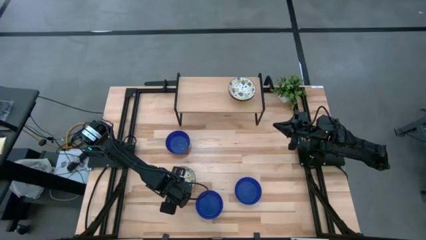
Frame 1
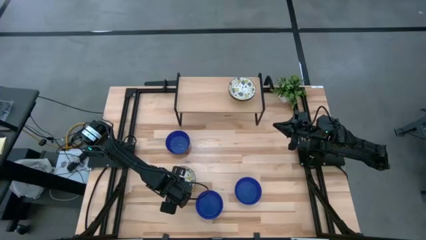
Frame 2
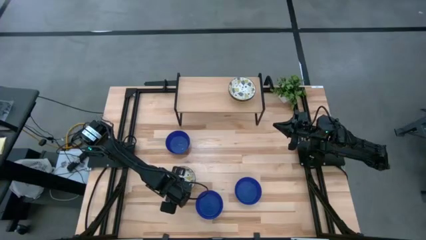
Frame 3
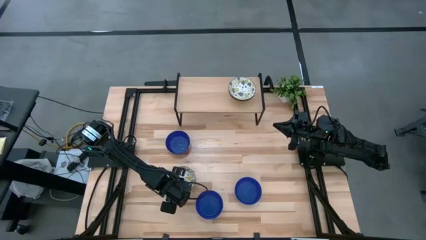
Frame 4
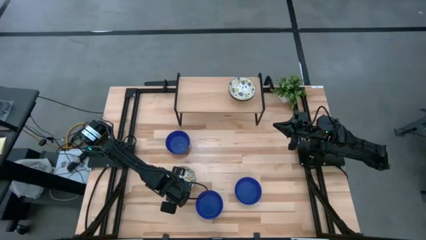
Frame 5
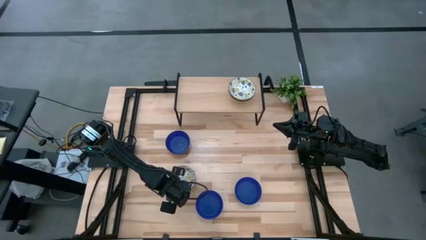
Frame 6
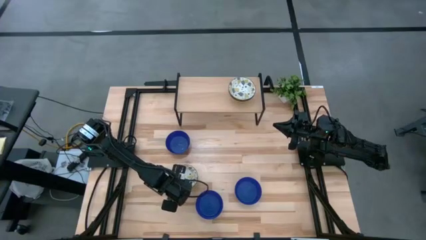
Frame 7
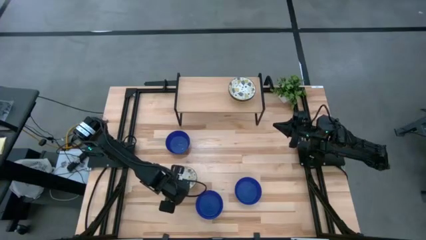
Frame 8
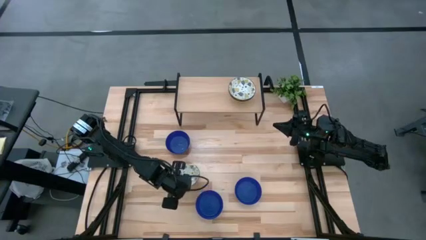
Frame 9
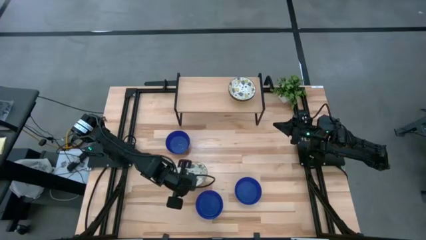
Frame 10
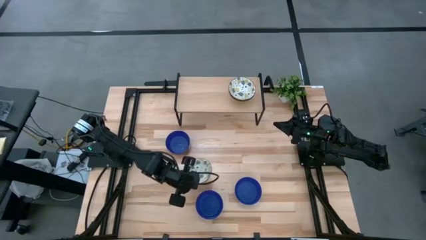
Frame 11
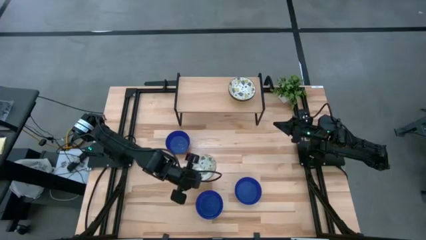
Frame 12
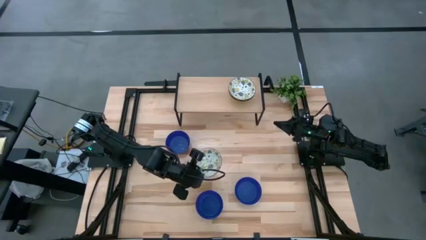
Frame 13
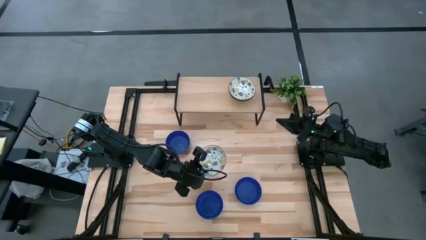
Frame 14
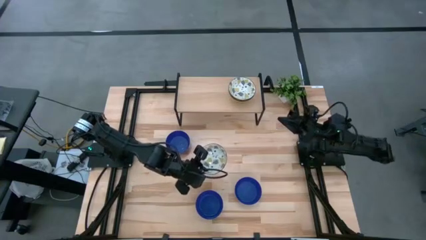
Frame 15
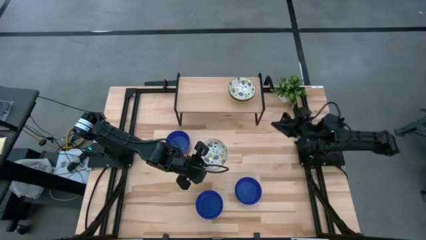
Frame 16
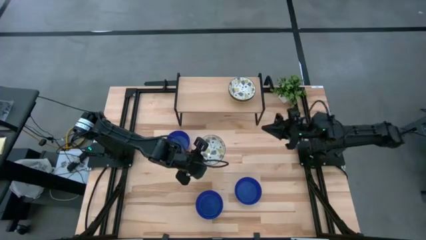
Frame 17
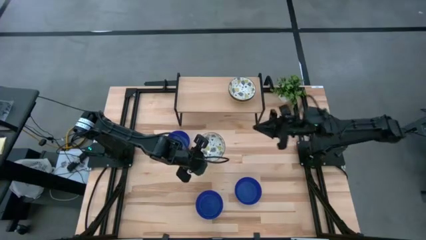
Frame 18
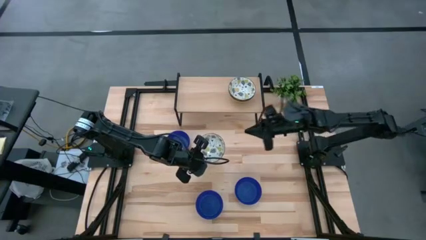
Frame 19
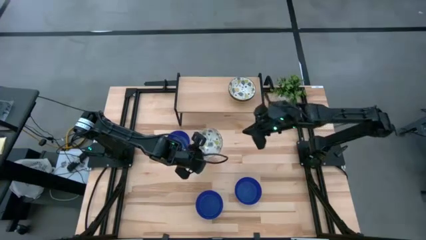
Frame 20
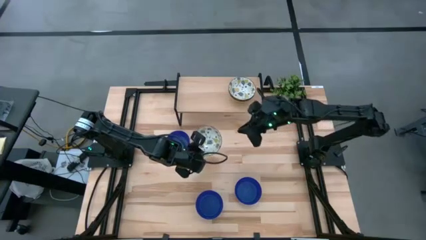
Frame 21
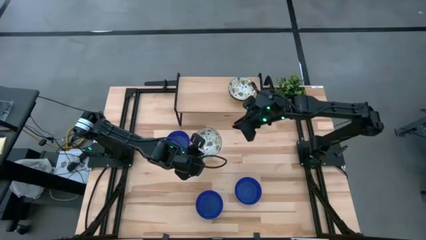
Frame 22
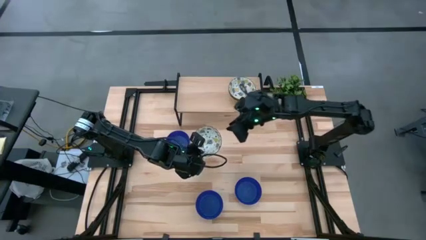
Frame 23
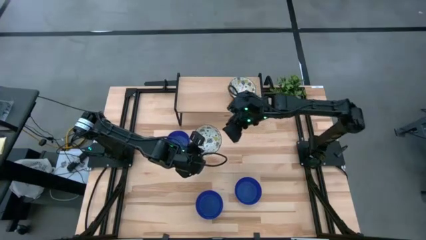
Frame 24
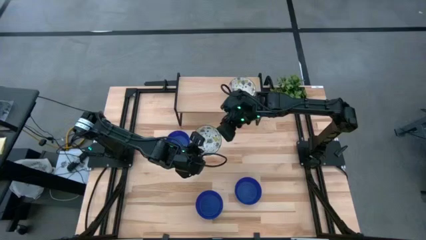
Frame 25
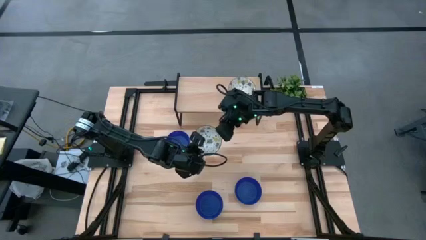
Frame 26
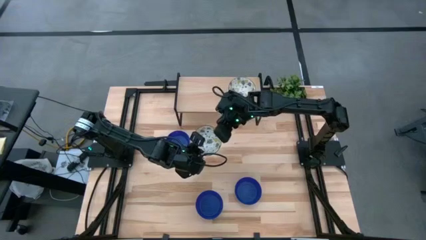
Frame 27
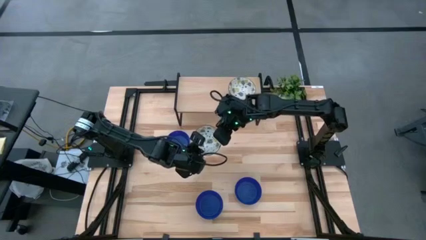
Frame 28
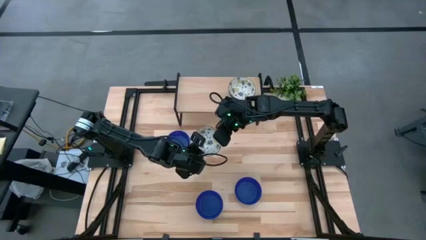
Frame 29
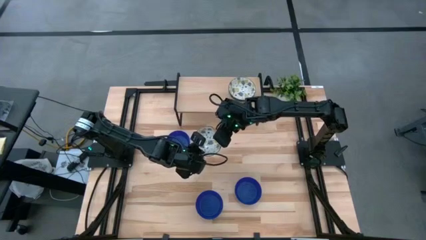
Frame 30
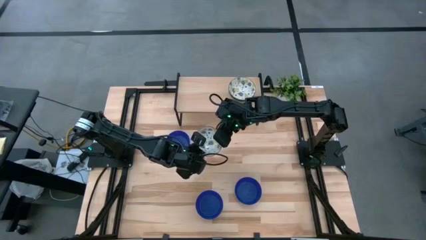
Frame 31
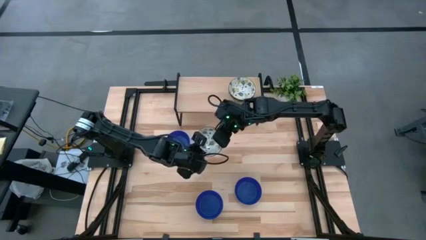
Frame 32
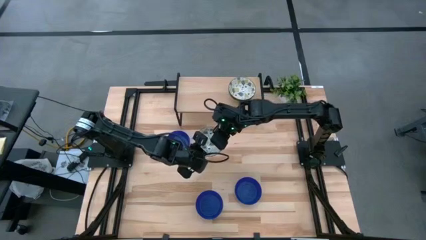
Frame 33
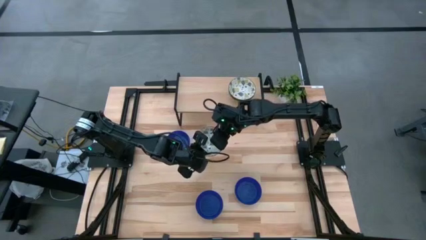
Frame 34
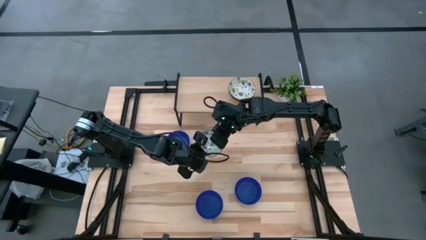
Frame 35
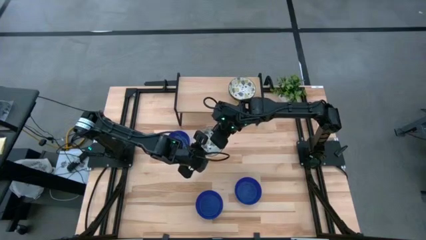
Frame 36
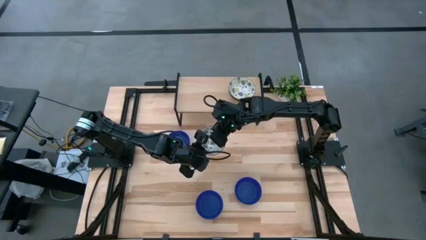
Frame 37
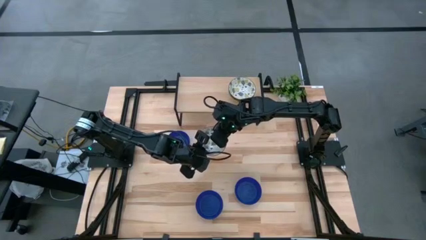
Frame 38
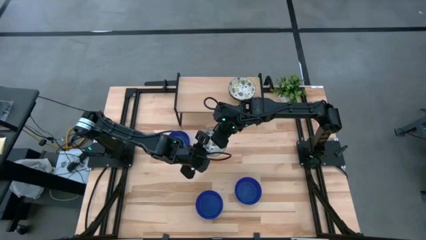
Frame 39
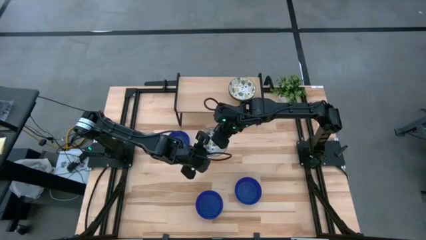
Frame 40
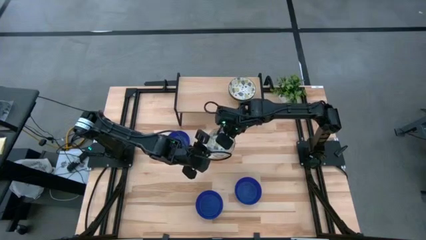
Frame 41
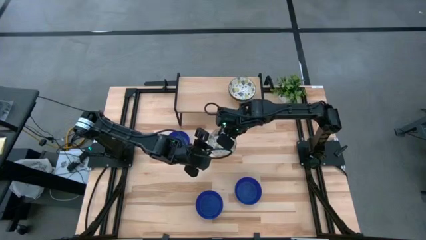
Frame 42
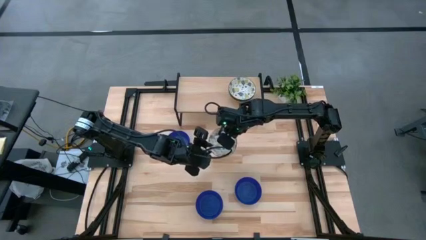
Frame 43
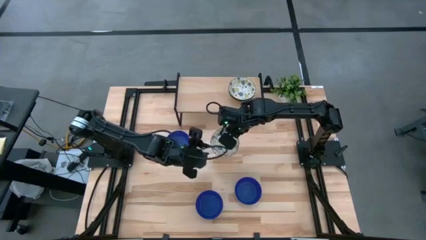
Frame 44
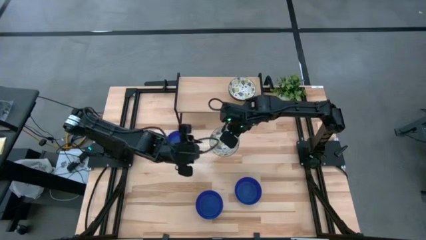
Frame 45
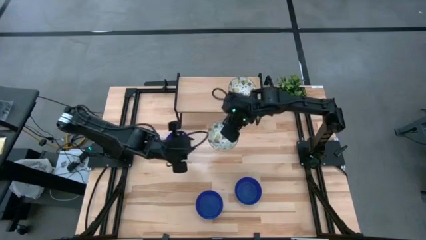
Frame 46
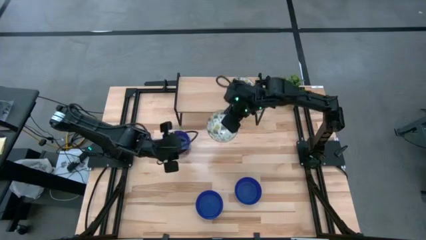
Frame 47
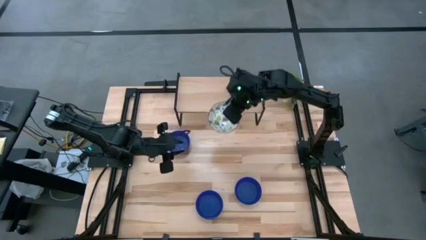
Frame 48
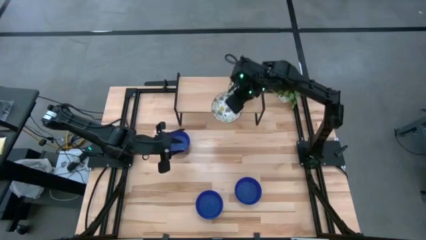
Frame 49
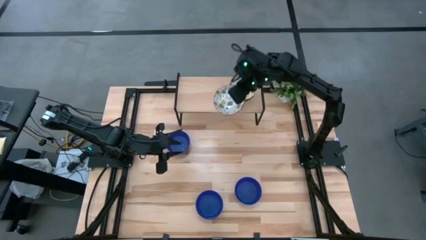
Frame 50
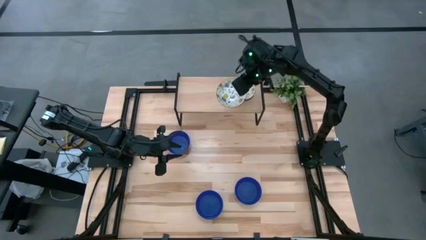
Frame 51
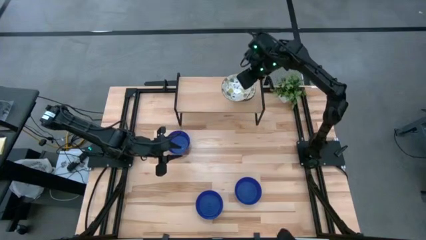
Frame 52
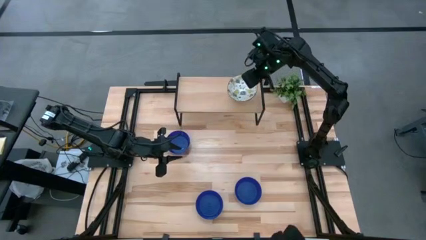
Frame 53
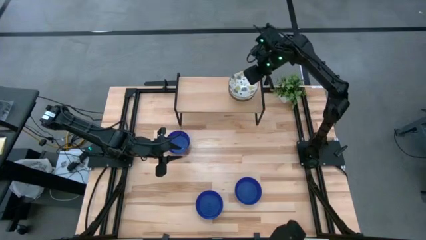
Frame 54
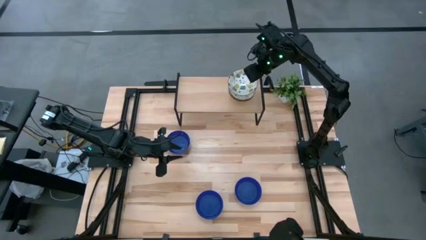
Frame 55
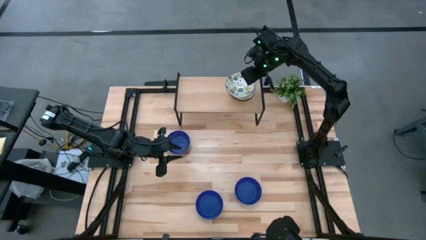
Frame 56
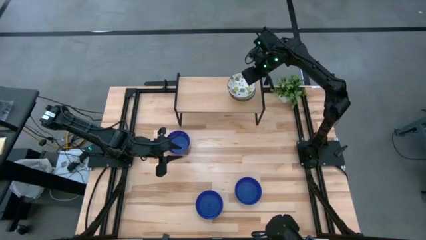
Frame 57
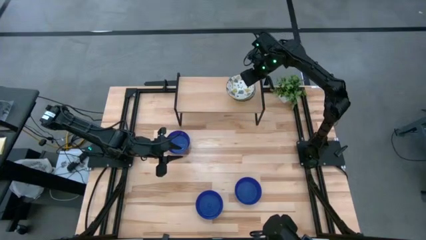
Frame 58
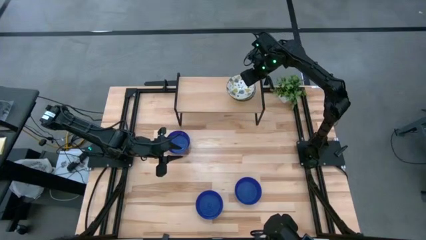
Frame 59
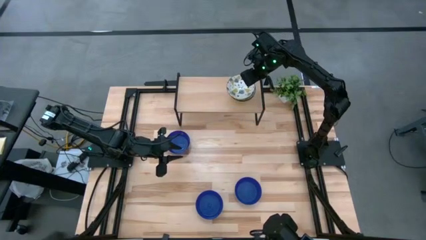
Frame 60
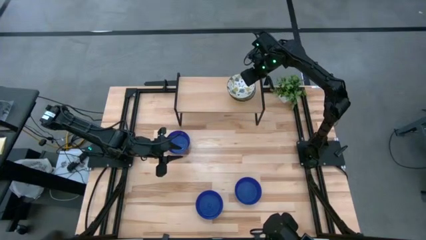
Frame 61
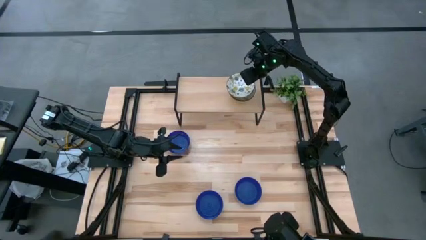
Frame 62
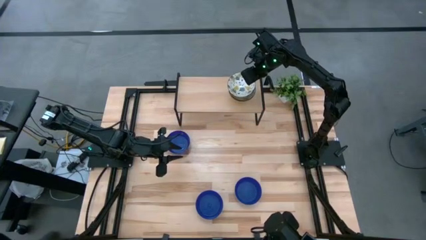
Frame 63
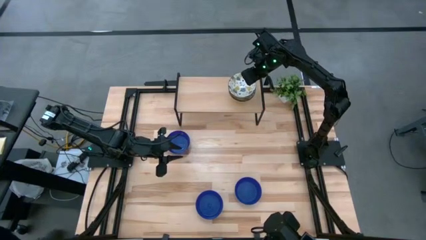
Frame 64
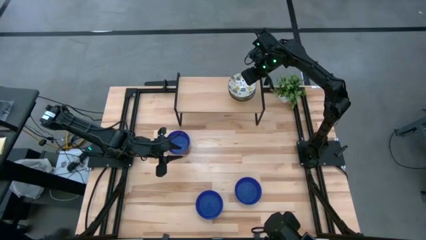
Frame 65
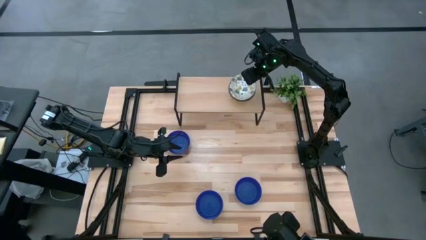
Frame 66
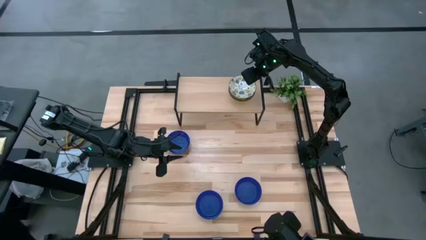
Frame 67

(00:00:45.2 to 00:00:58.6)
Task: Pick & Place Mini bowls
Stack the white patterned bowl on top of the white patterned bowls on the shelf
